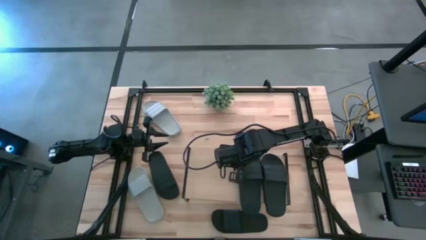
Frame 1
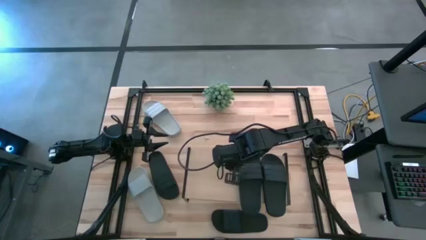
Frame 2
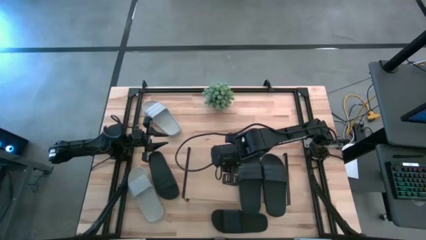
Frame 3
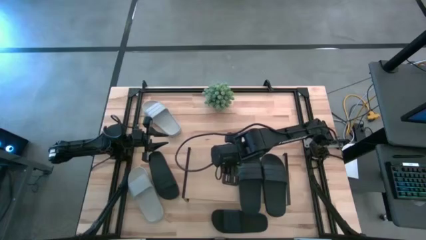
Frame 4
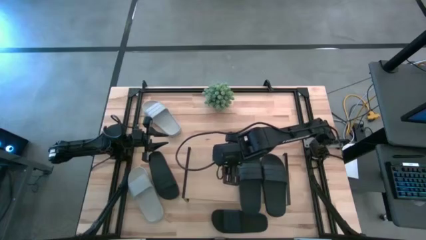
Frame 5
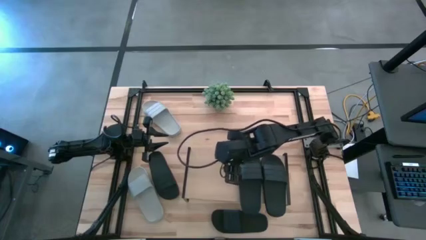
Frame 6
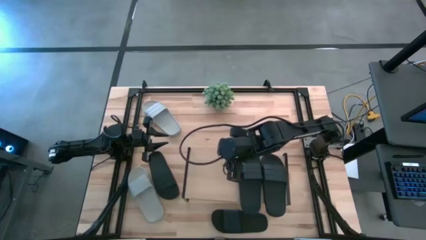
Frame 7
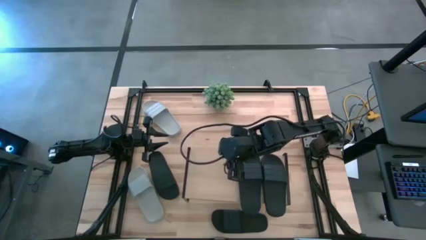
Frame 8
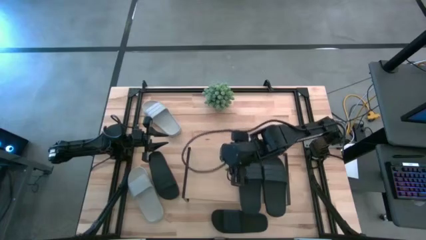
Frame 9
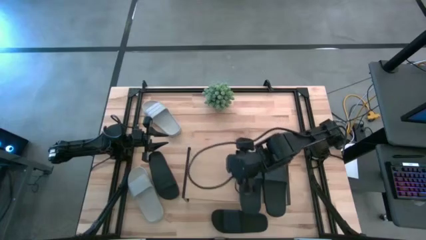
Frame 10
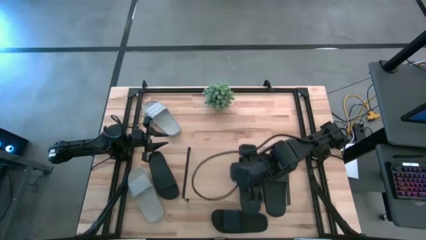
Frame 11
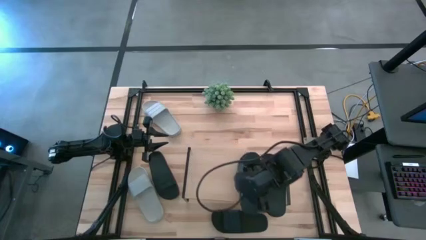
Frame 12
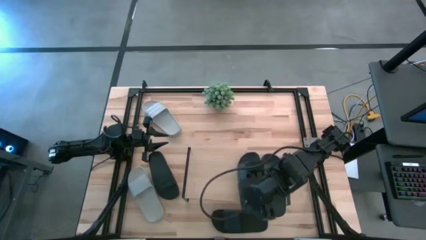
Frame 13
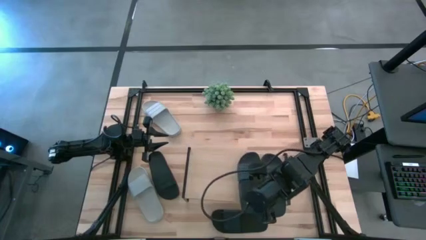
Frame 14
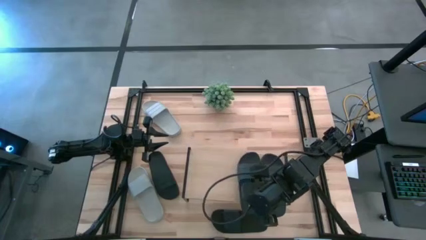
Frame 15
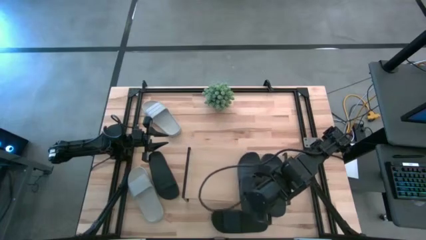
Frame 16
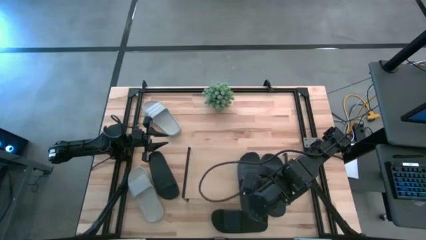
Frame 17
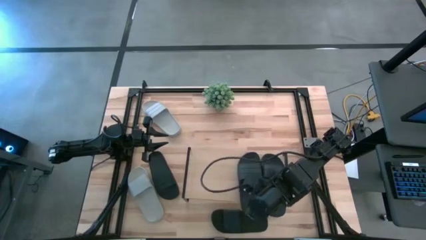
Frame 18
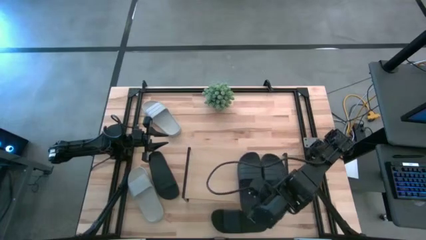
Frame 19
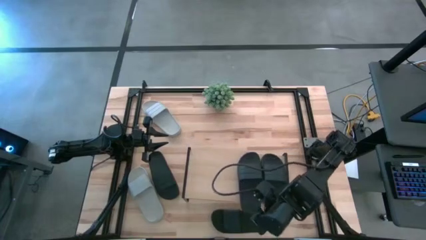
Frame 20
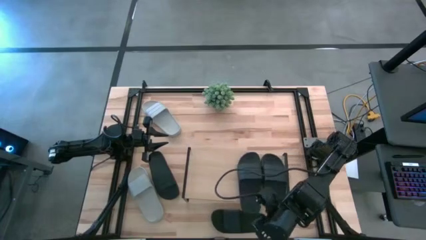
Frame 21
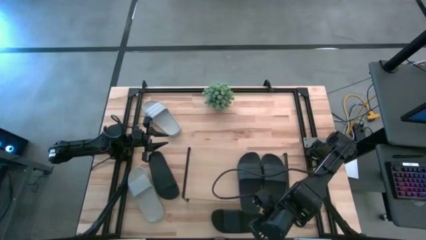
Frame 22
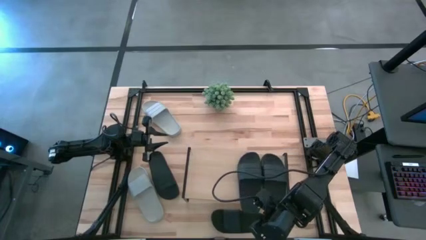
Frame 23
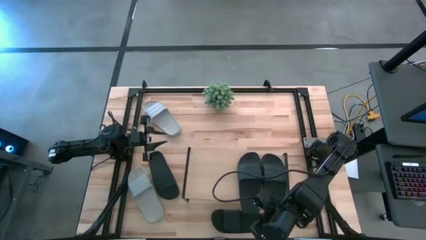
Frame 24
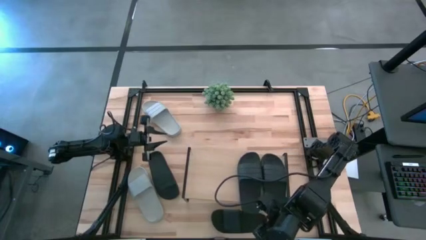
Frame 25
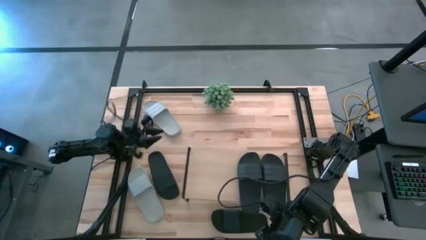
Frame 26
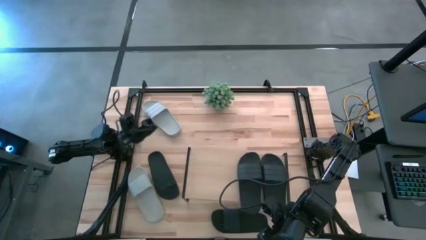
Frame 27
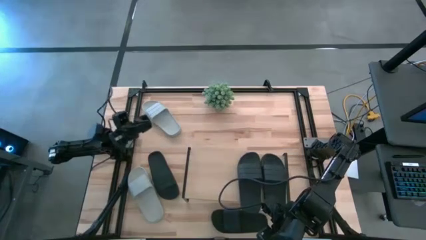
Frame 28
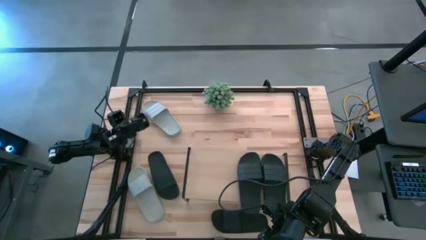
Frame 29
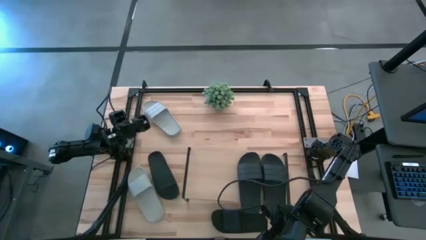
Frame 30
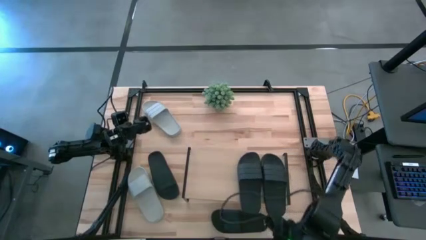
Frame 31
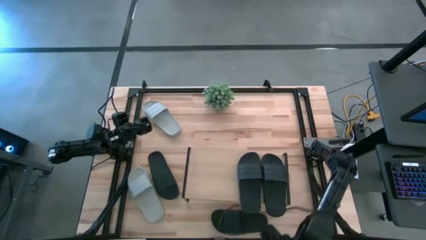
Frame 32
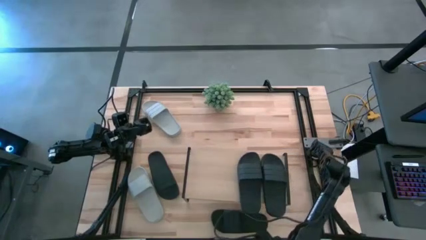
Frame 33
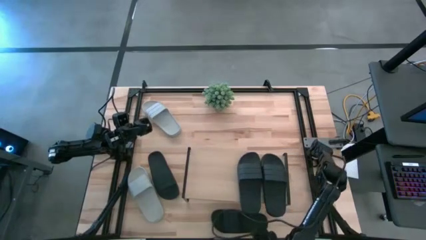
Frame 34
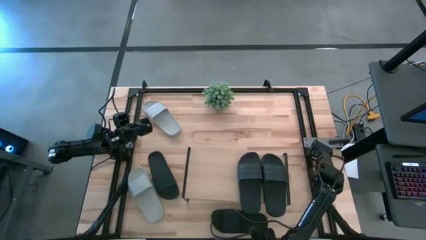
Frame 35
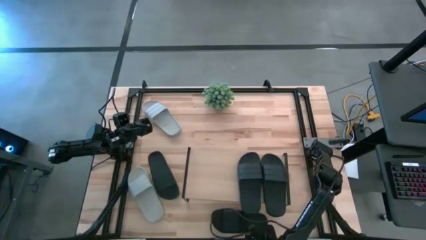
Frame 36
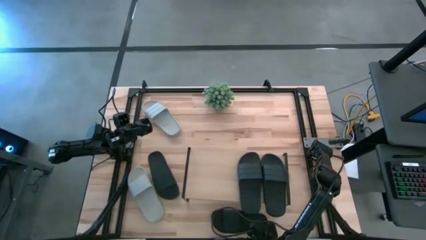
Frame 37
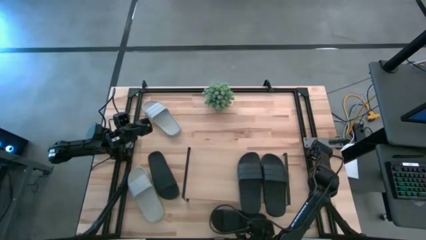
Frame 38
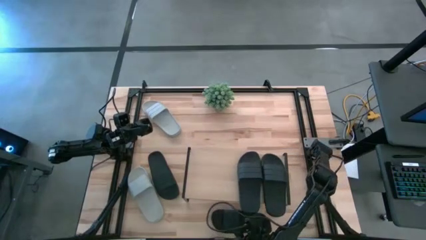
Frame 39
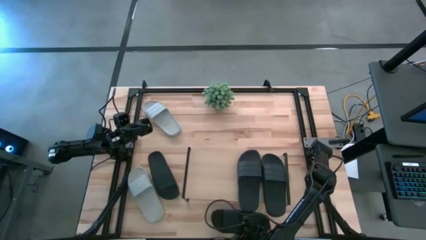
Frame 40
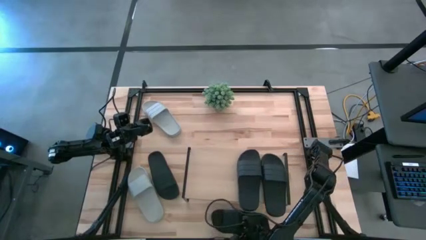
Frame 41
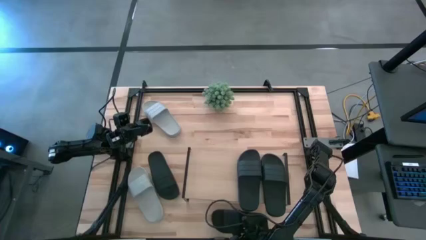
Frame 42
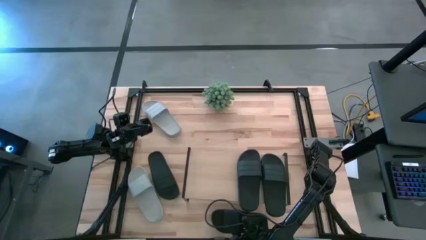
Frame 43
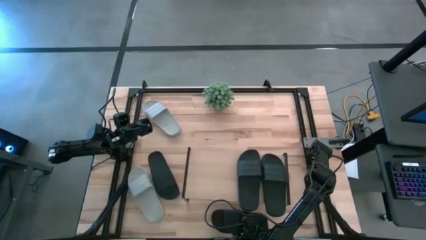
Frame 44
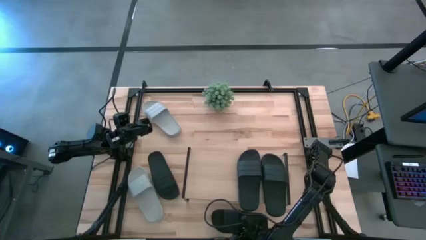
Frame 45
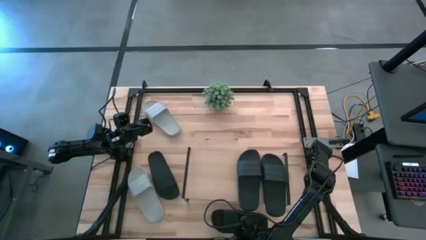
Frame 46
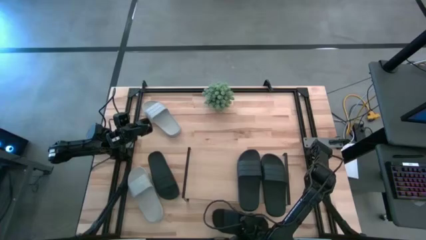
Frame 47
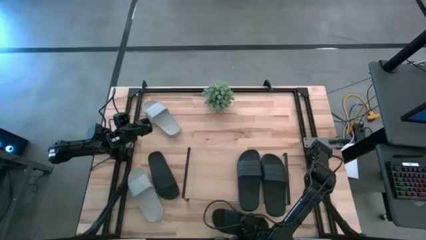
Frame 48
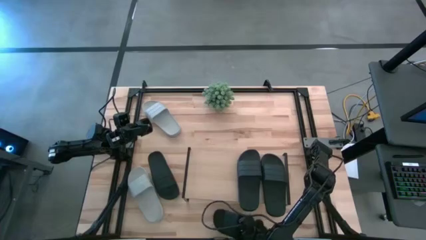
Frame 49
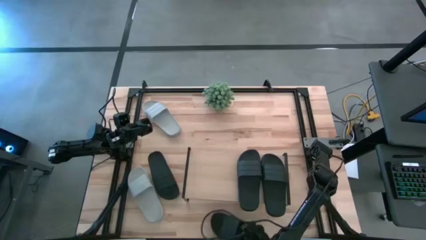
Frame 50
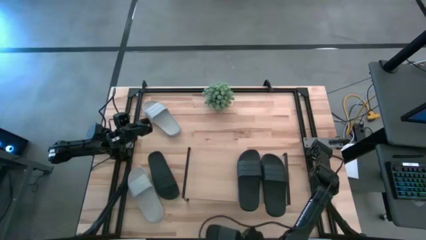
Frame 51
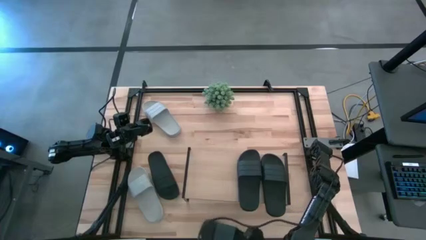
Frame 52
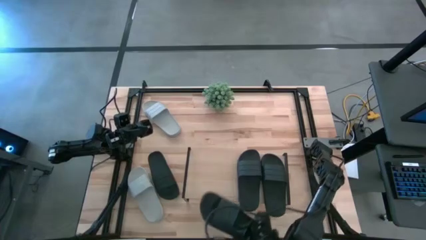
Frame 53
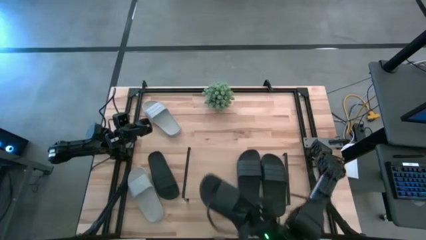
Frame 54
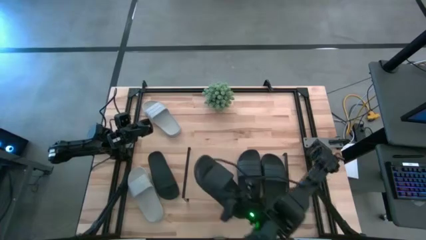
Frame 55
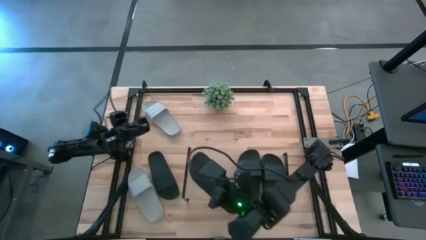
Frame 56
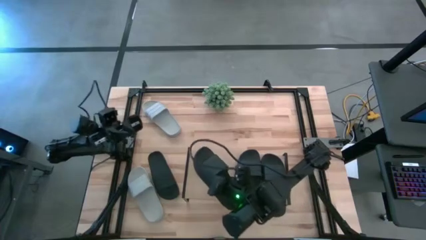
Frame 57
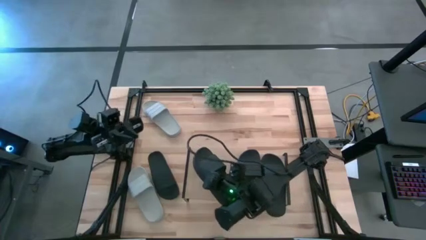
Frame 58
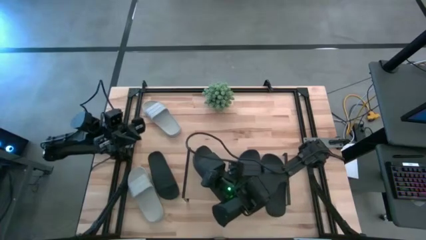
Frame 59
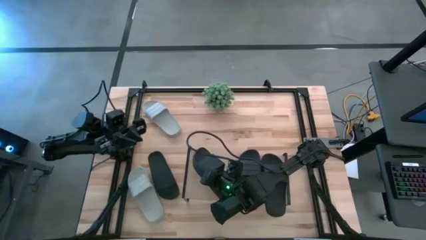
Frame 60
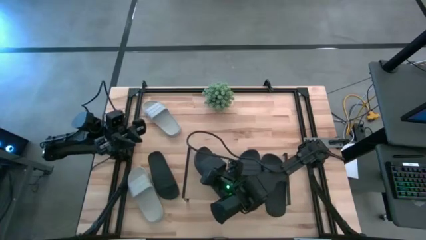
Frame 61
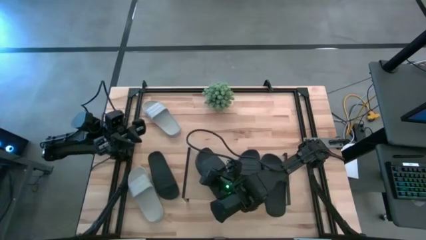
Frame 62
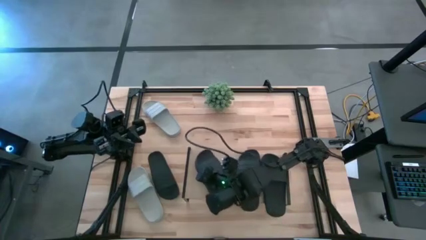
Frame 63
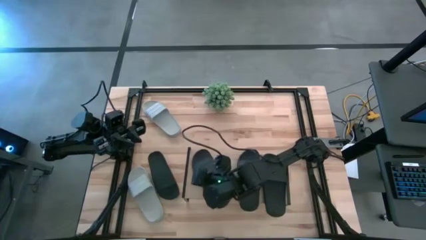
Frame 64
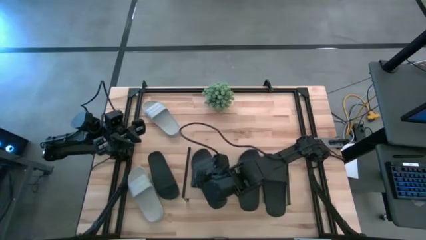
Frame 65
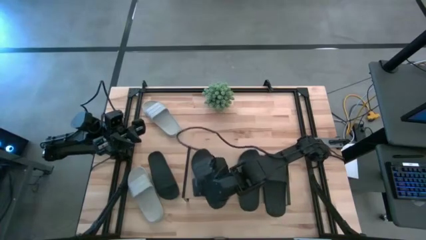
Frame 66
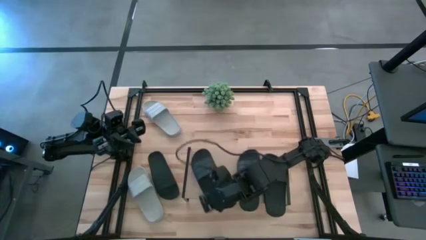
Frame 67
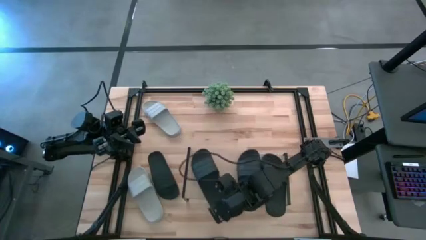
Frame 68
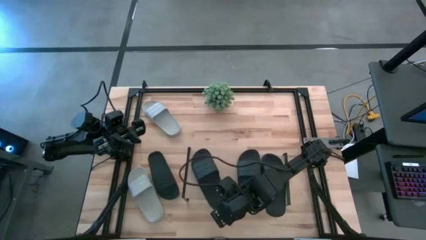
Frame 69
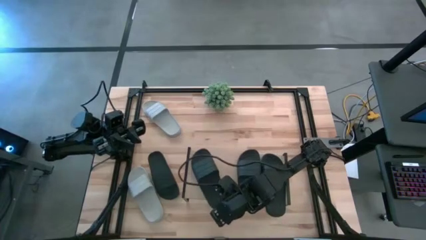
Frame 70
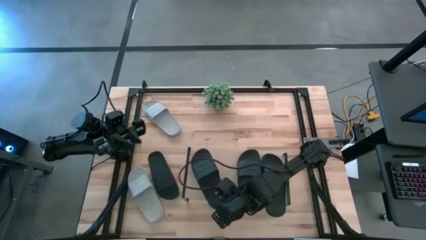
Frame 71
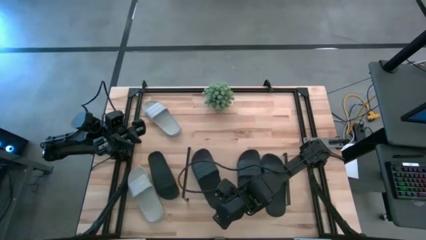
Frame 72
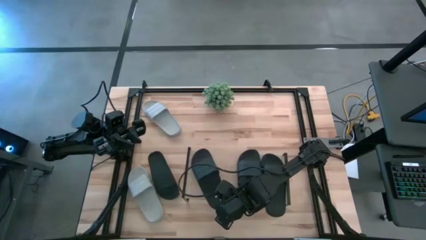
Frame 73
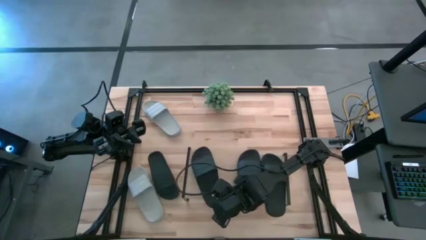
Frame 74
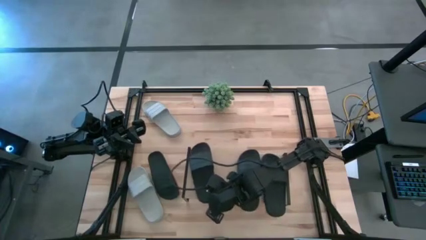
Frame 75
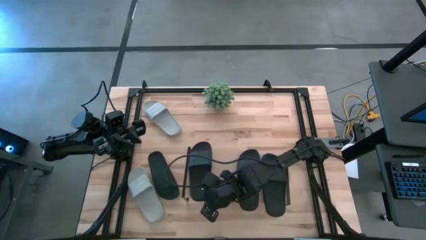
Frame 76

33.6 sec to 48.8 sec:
Task: Pick and place slides into the shelf
Put the black slipper on the shelf
